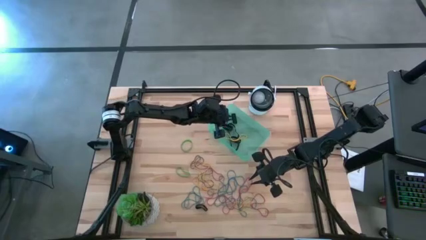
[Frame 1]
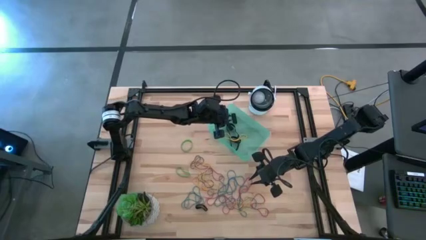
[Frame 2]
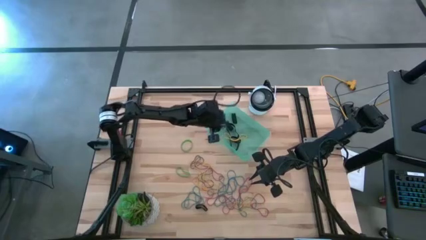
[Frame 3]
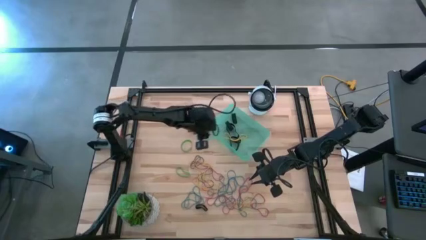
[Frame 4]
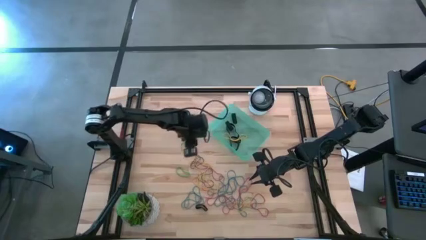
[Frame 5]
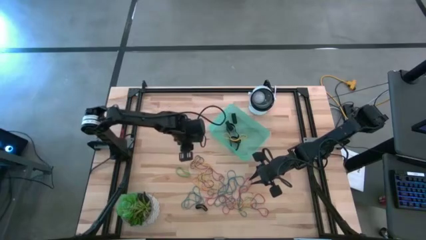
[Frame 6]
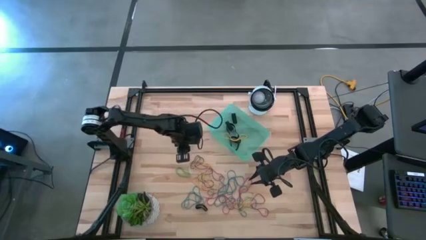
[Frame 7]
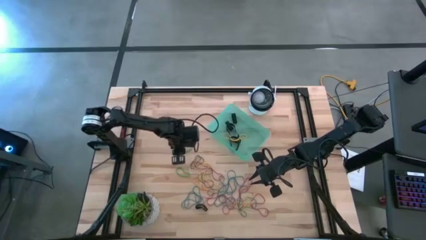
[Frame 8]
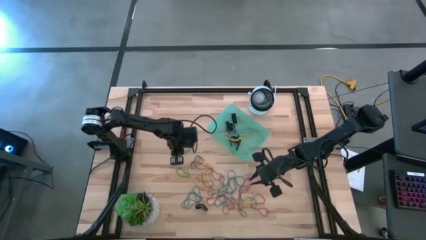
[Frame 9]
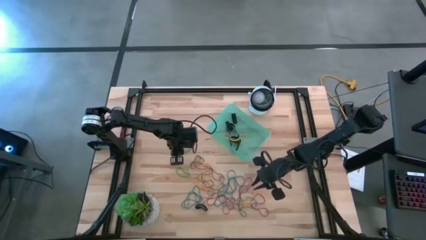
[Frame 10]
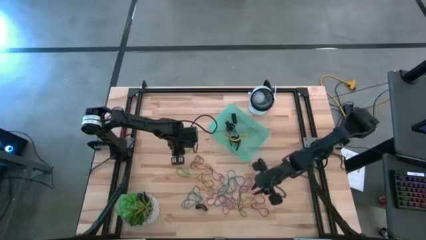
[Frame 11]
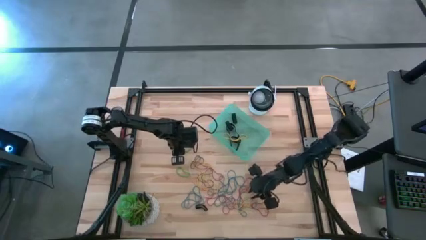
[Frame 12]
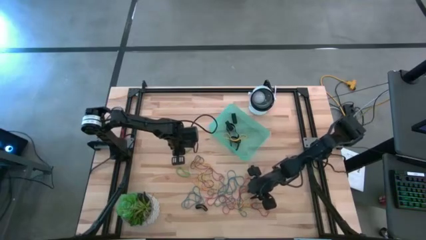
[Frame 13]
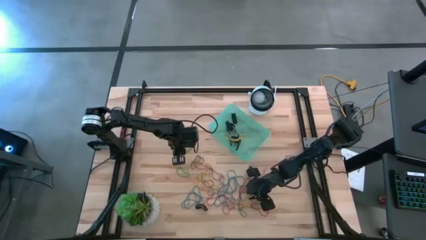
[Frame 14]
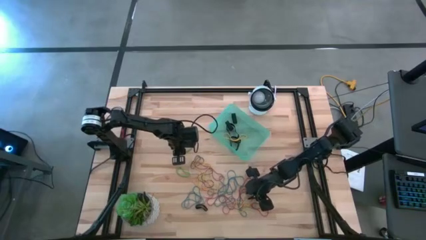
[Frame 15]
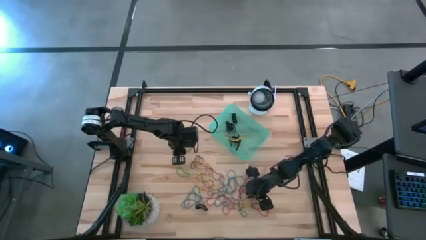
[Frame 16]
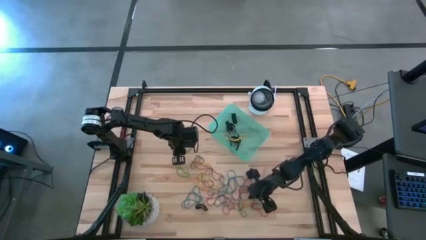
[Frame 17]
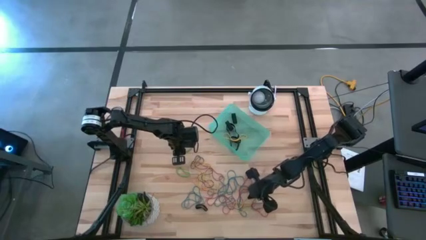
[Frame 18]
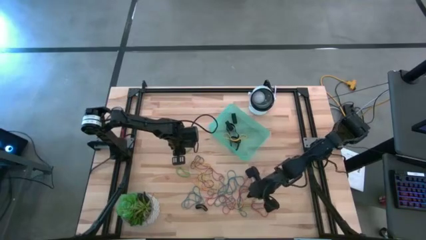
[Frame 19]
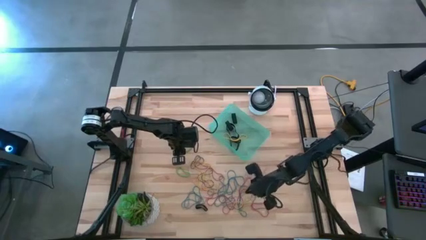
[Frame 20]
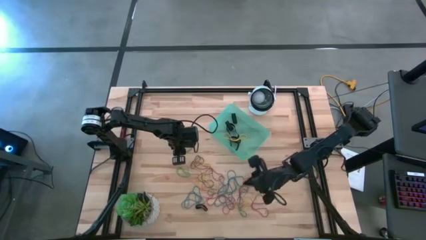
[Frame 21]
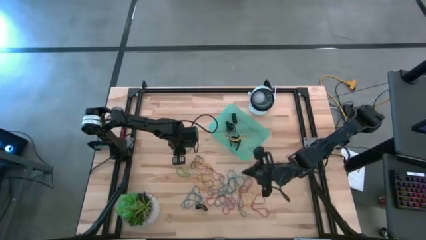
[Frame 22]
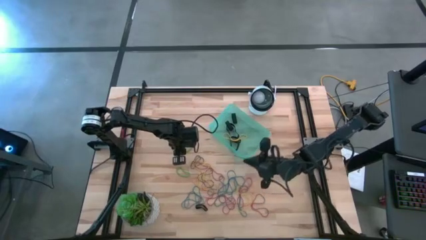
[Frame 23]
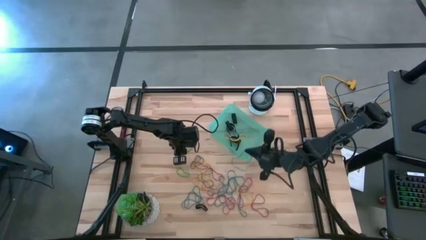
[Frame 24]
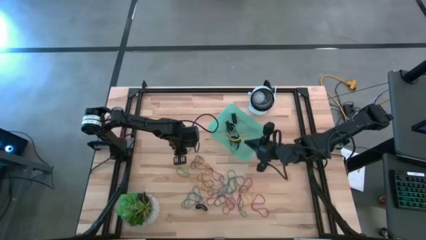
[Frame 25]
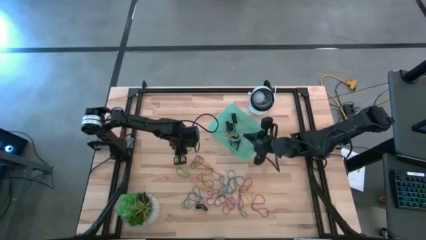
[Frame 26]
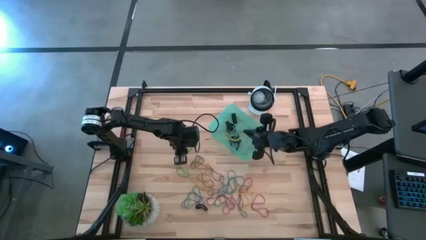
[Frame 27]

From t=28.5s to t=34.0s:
Task: Pick and place rubber bands into bin
Put the blue rubber band into the blue bin

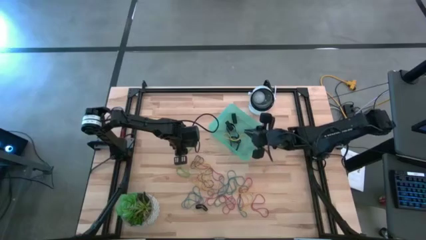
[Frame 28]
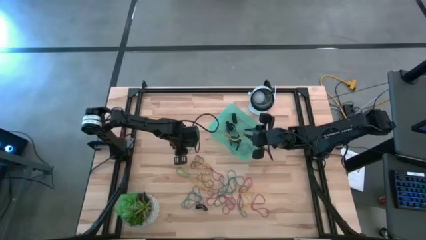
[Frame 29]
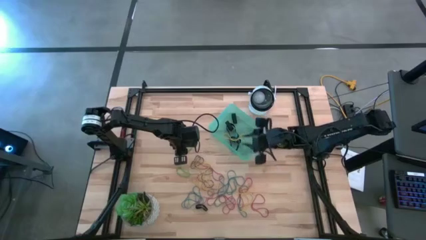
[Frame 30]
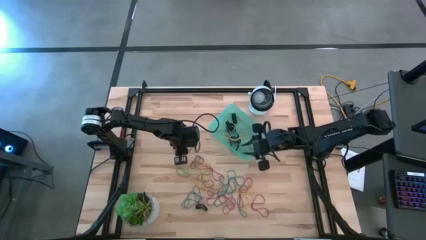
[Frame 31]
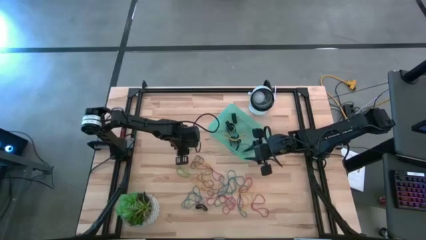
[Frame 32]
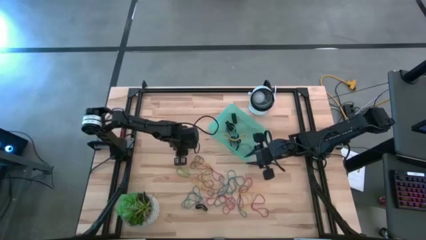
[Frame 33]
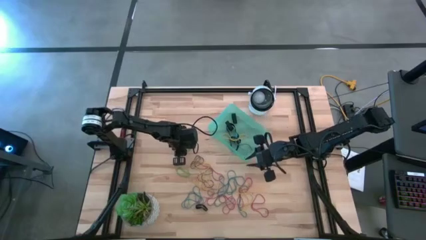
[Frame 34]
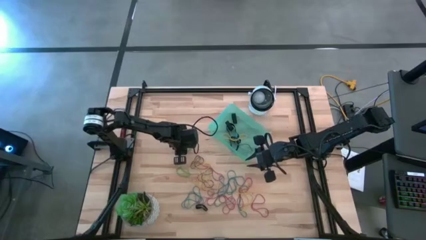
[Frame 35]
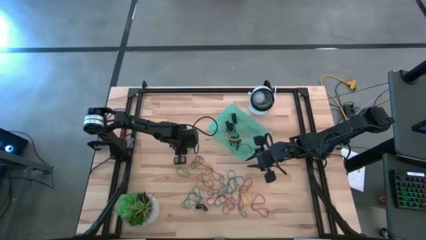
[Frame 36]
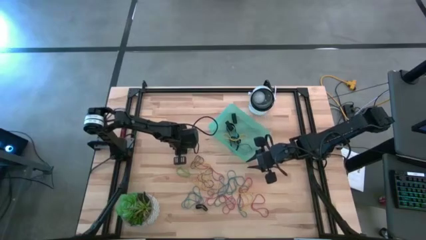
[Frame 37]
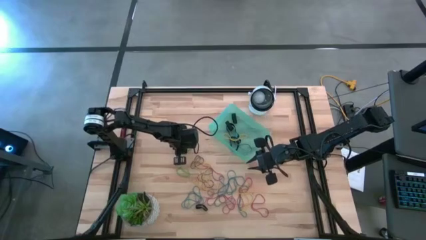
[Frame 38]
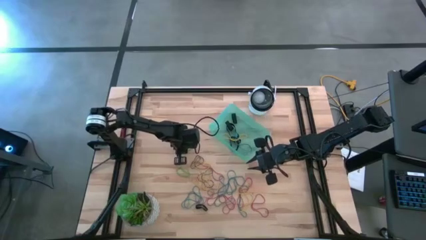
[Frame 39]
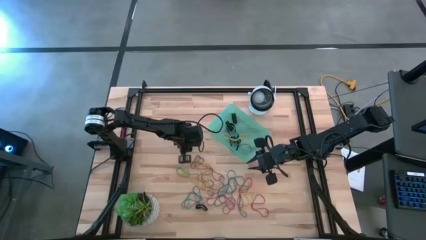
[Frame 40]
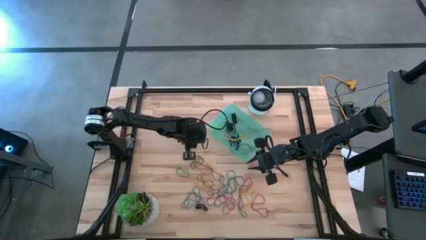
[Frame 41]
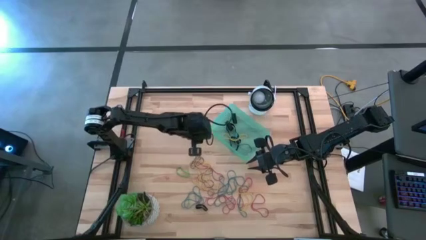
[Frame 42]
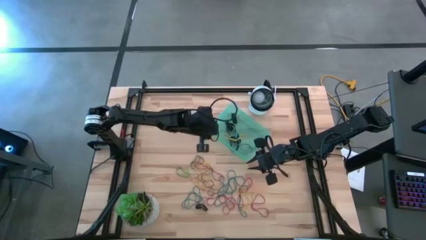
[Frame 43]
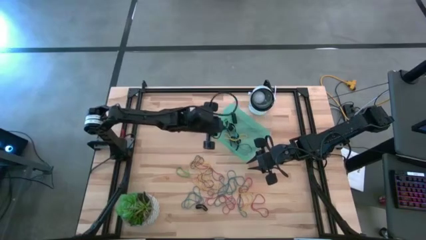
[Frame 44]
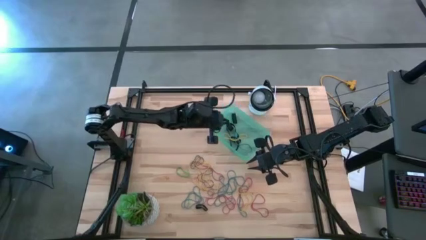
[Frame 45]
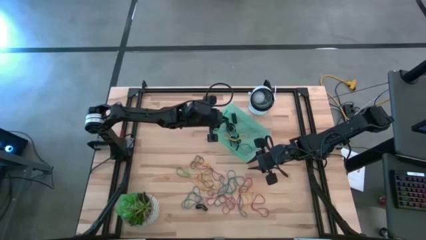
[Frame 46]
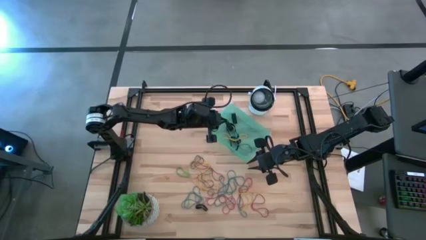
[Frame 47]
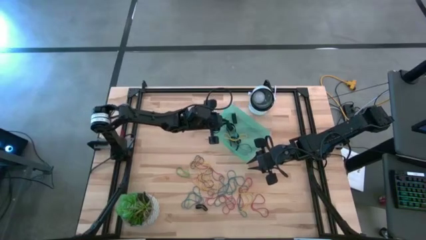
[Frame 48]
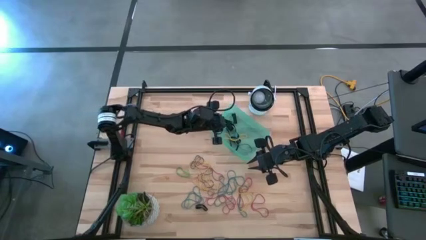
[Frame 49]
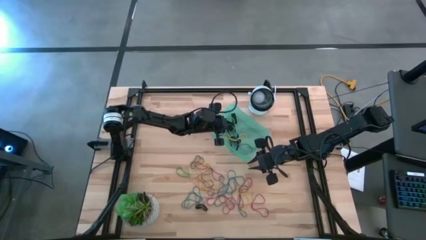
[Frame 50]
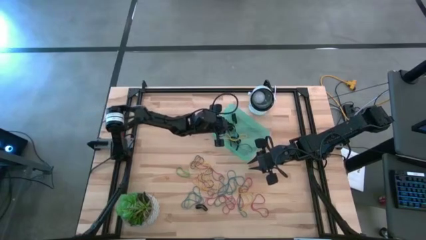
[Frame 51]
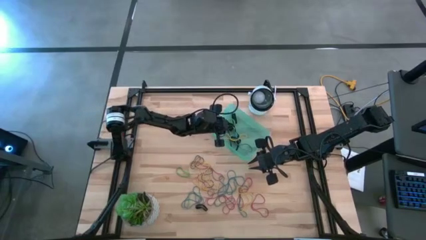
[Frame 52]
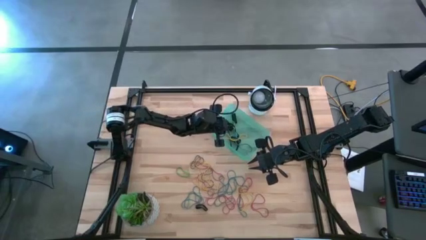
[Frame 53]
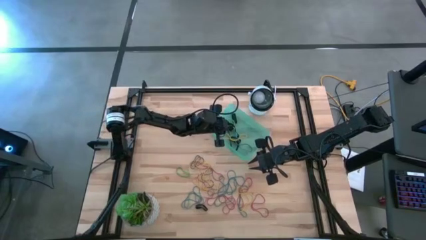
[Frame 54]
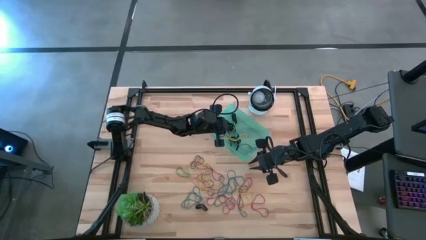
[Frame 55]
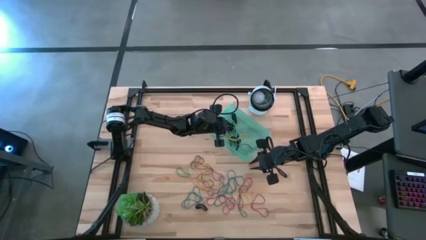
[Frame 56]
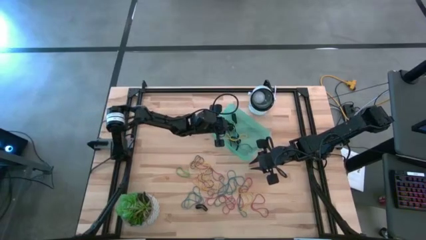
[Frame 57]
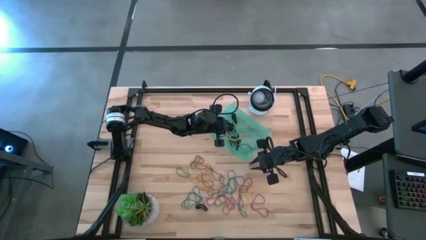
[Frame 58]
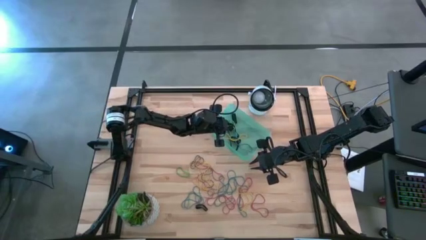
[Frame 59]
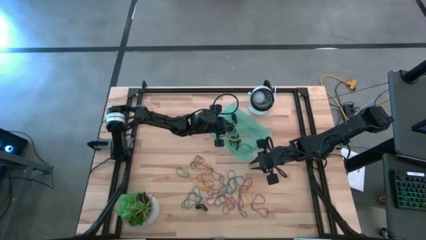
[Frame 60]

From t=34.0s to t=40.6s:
Put the green rubber band into the blue bin

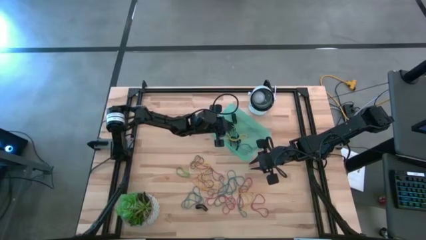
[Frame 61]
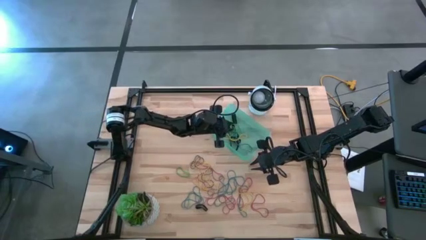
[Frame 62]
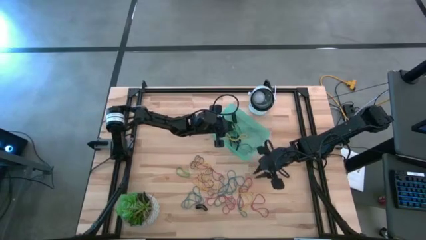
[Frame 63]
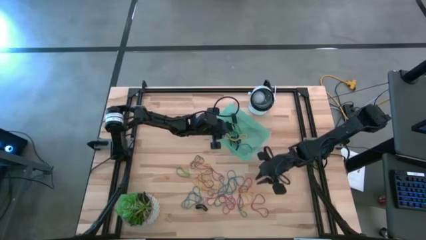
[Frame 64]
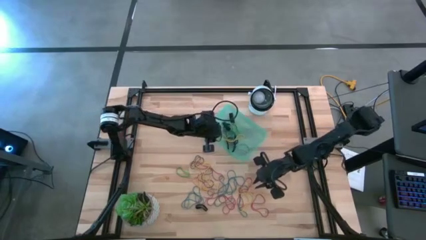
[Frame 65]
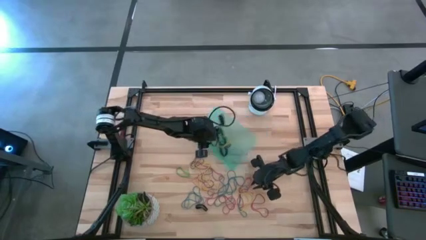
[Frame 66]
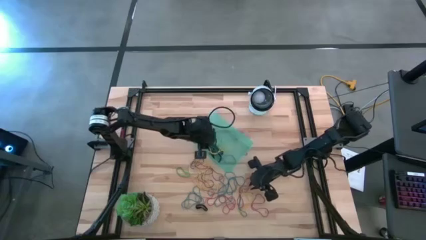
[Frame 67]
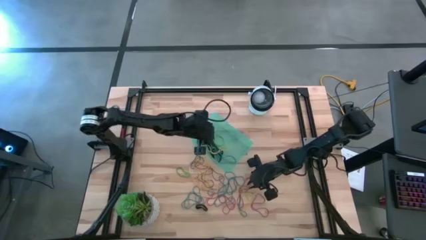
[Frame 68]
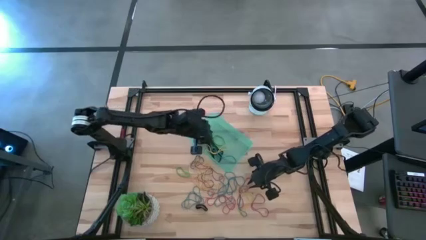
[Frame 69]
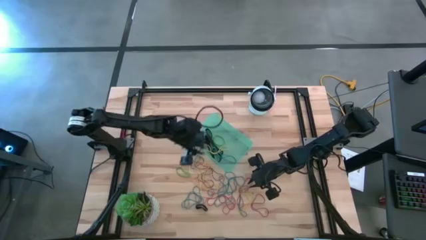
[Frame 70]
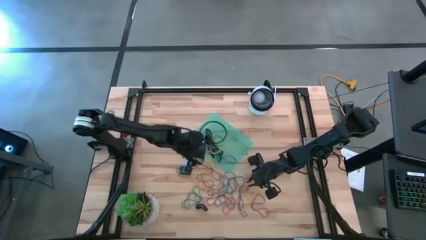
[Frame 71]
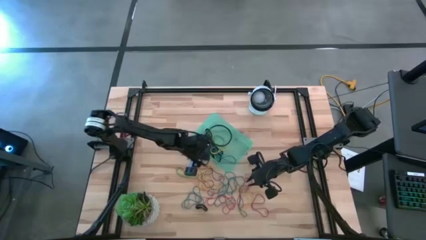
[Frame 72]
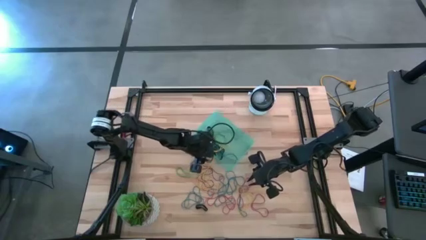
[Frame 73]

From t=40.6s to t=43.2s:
Adjust the blue bin

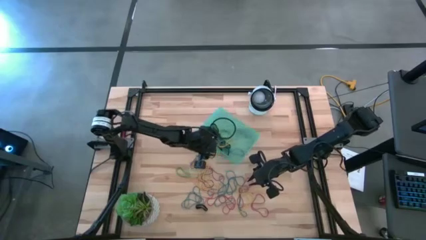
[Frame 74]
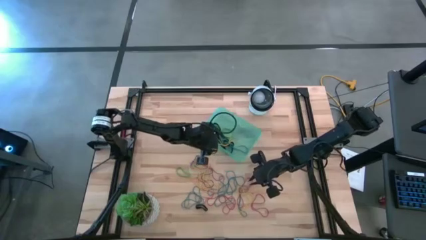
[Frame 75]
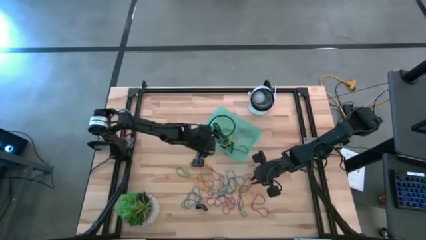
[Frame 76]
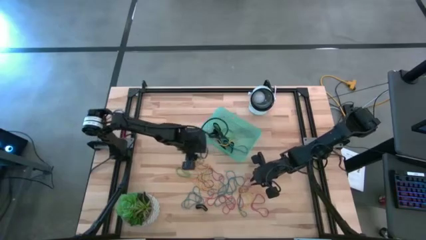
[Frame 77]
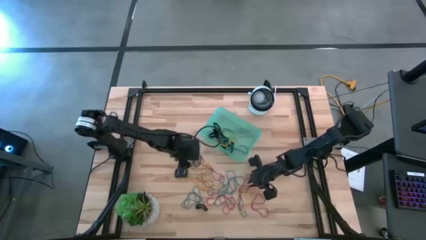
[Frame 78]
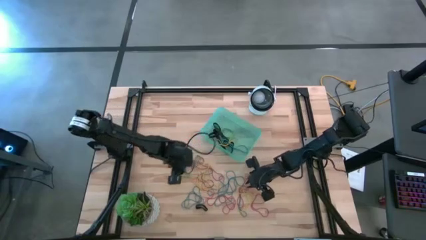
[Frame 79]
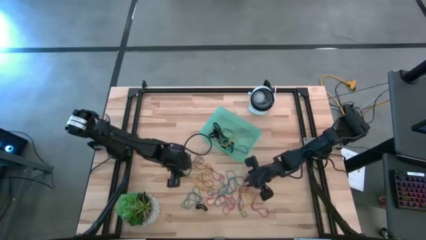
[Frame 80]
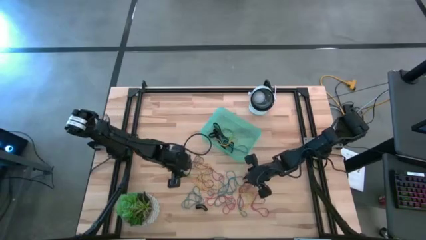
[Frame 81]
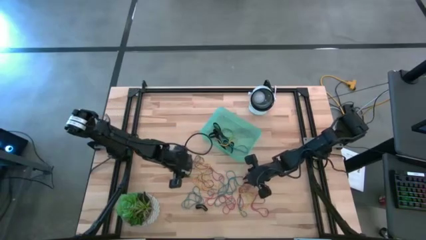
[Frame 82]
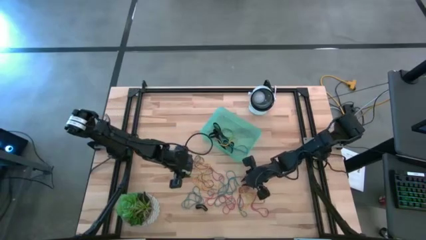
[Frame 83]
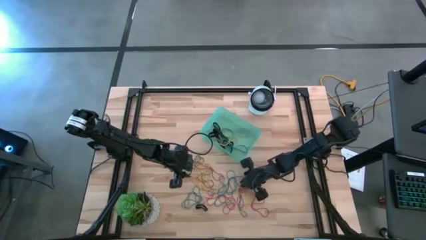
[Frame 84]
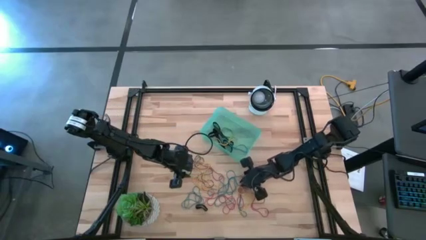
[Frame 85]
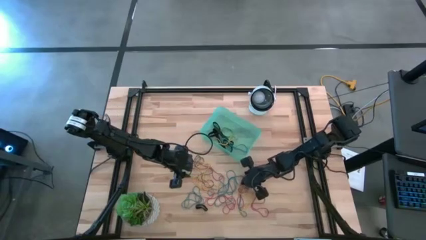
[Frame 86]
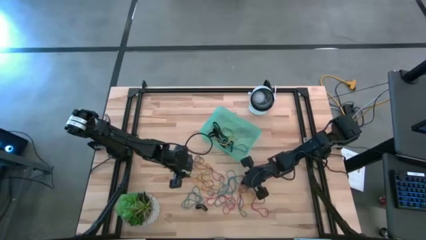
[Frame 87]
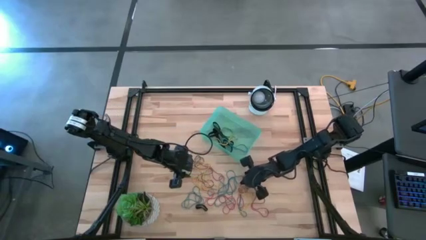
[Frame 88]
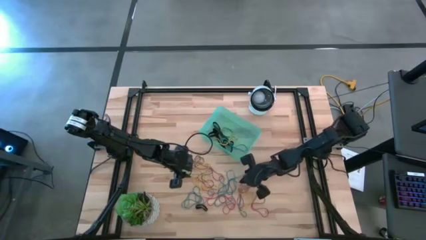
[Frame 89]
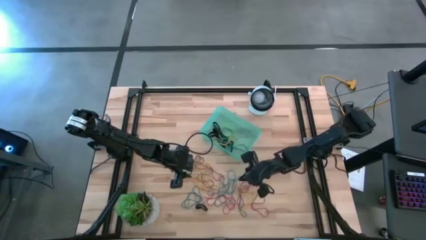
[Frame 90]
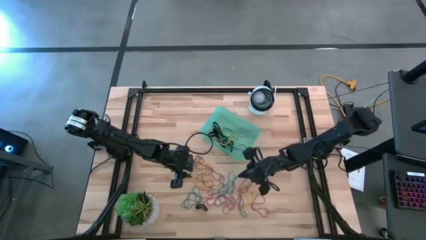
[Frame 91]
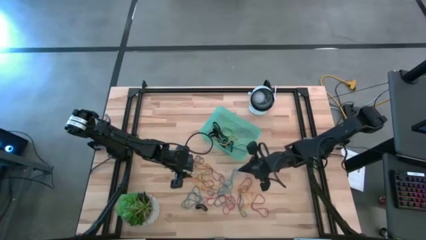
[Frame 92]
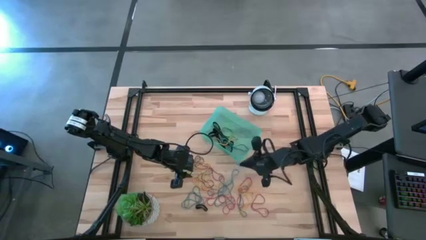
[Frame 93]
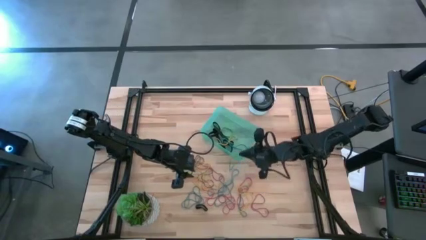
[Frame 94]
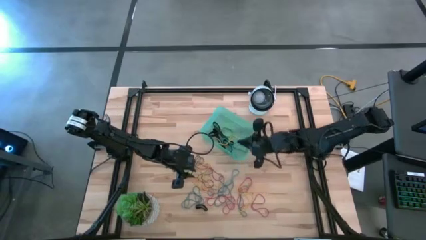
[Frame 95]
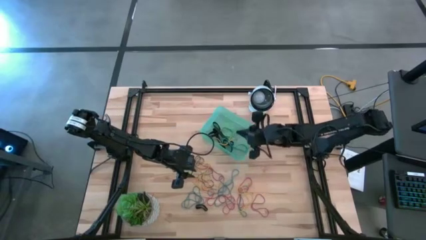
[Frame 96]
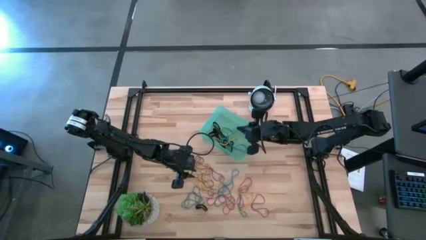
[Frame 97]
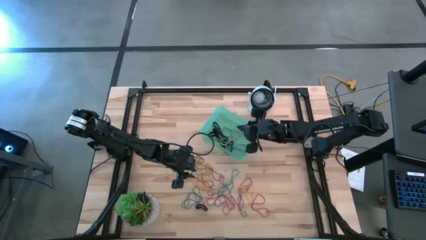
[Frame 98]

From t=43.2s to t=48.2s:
Put the blue rubber band into the blue bin
